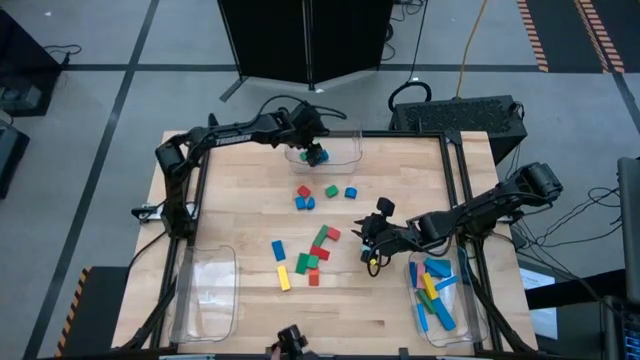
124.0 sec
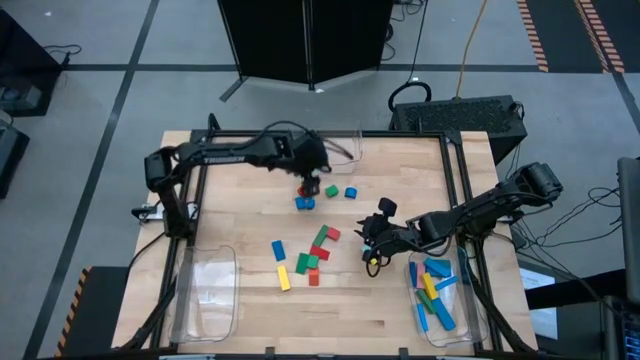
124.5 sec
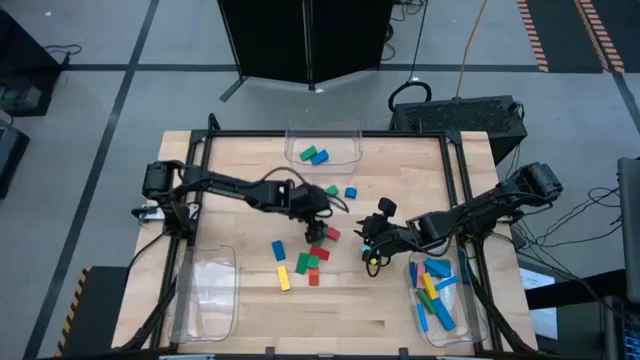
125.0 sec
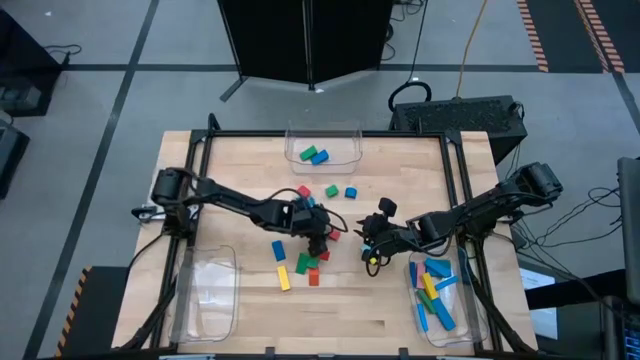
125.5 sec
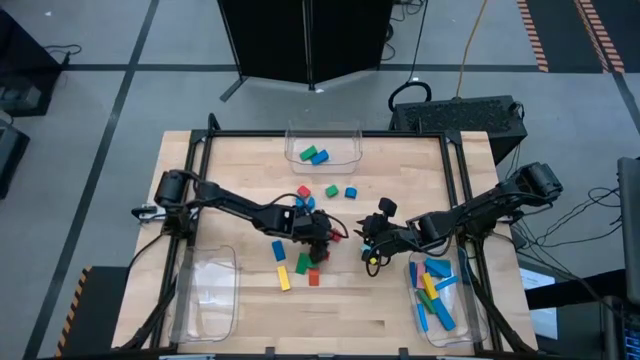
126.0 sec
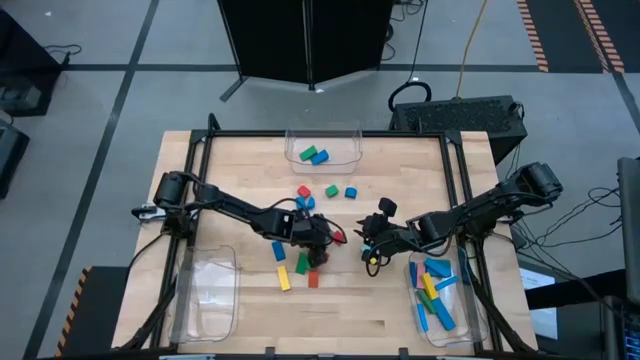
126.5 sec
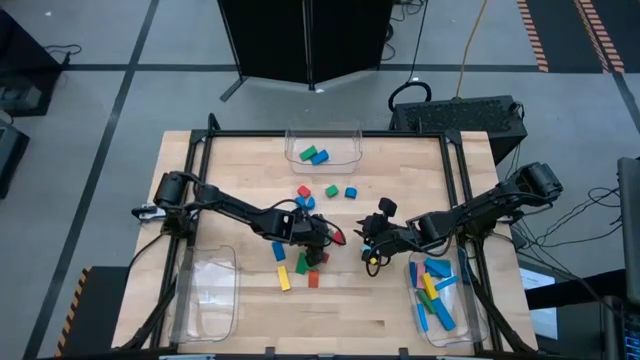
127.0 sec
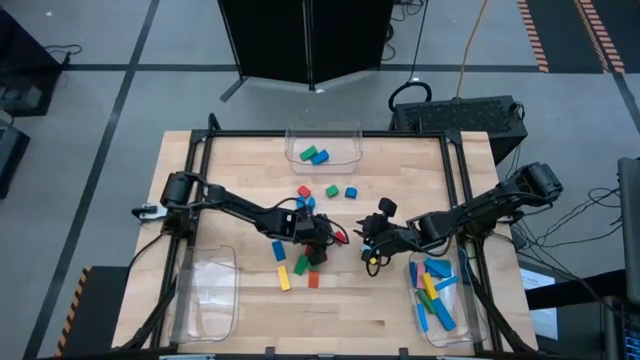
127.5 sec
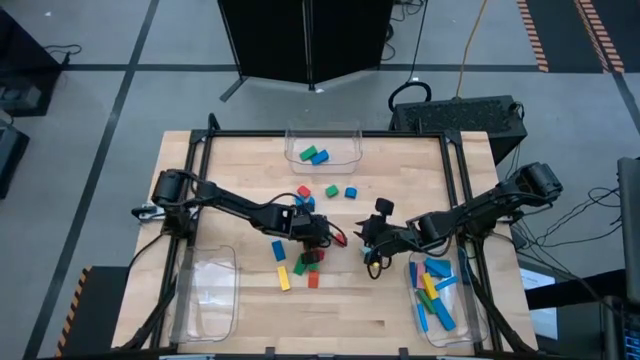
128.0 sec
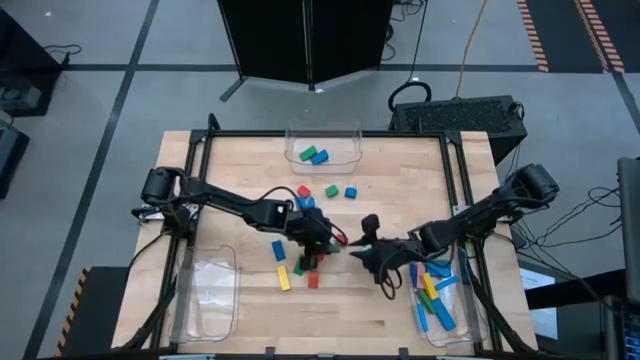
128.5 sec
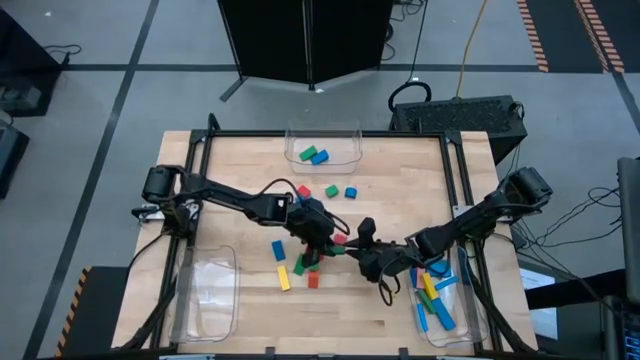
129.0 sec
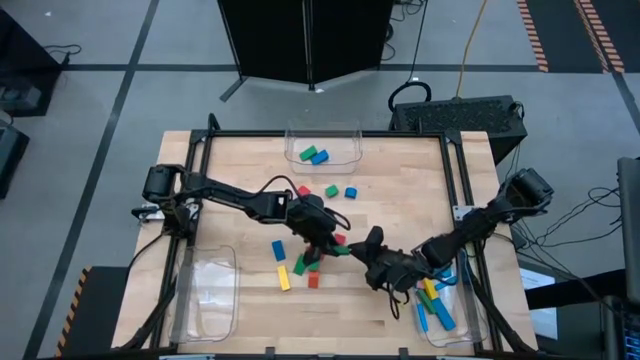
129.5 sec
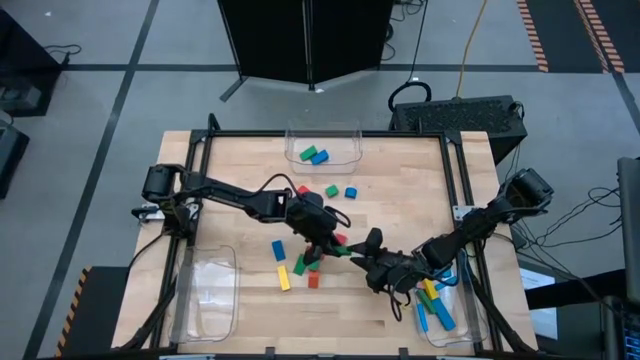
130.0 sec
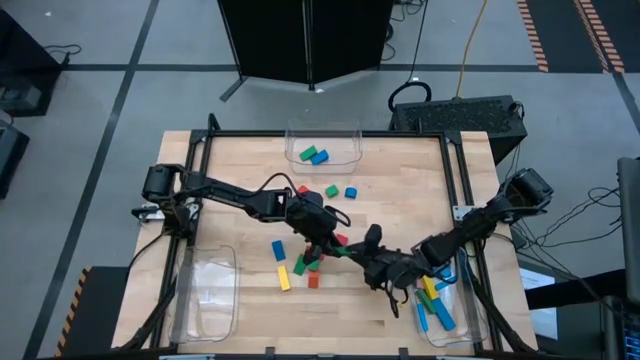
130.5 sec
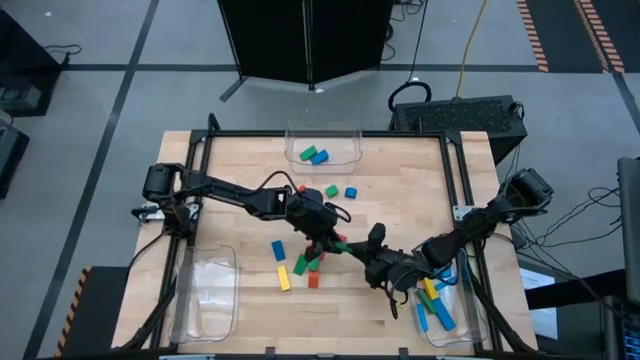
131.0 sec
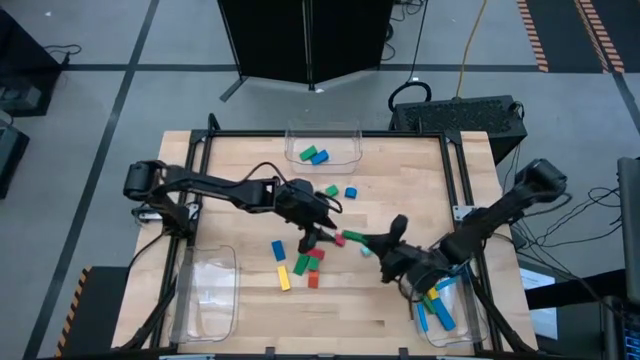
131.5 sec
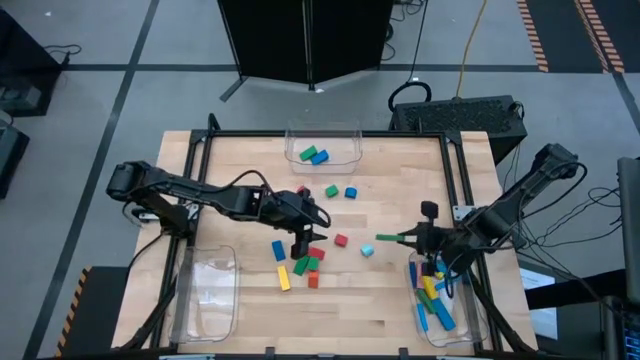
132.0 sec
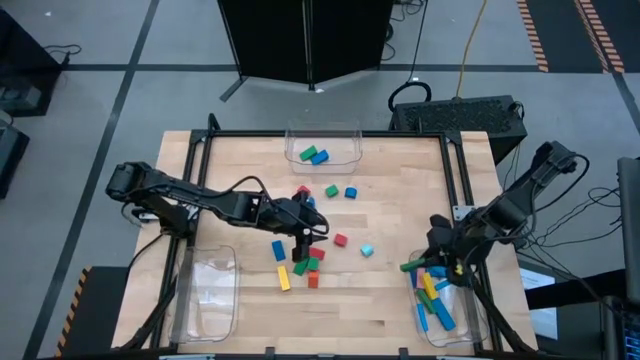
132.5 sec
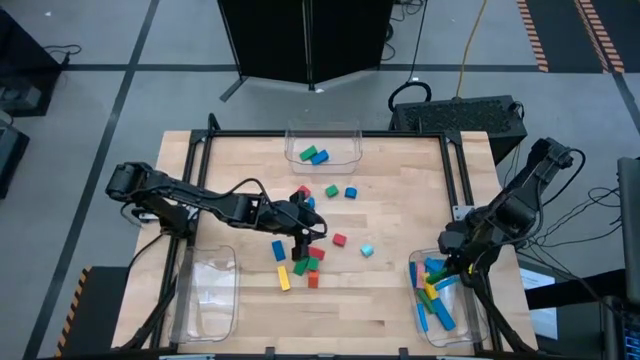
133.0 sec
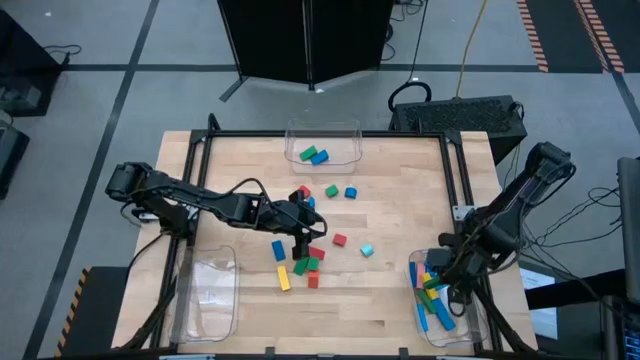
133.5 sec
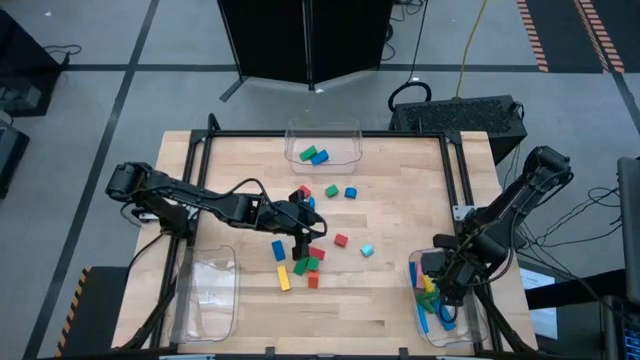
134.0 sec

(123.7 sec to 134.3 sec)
Task: Sort blocks by size
Put the green rectangle block into the bottom right transparent bin

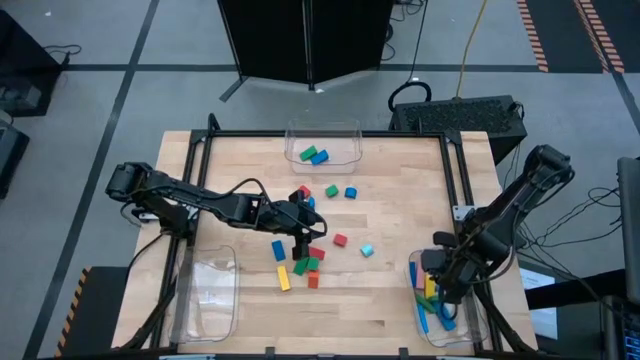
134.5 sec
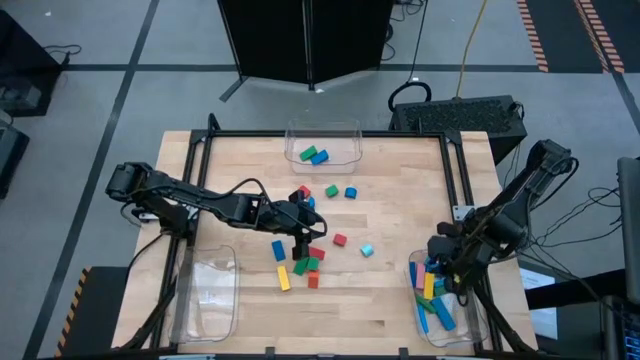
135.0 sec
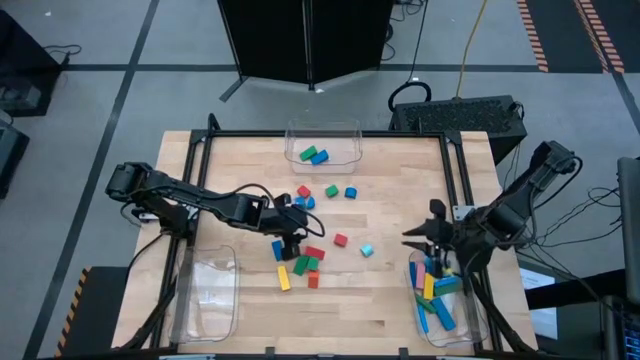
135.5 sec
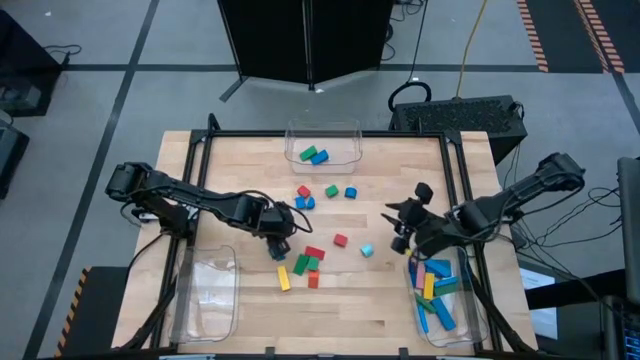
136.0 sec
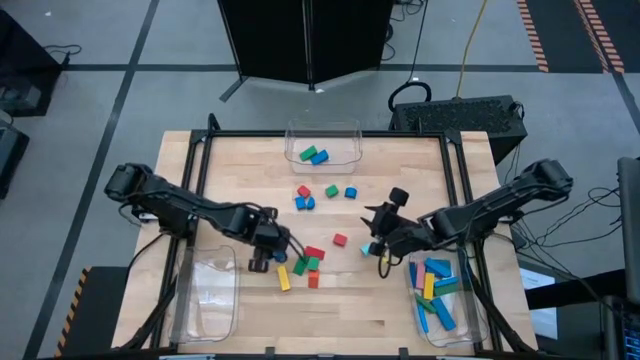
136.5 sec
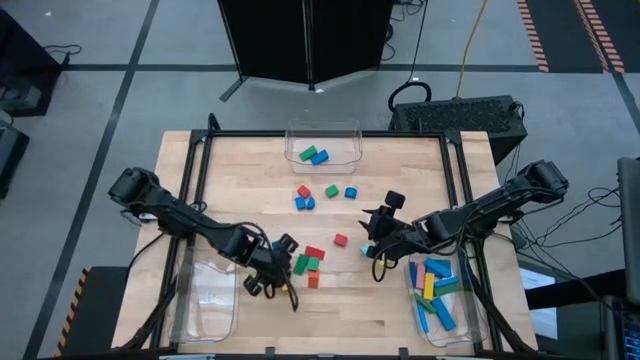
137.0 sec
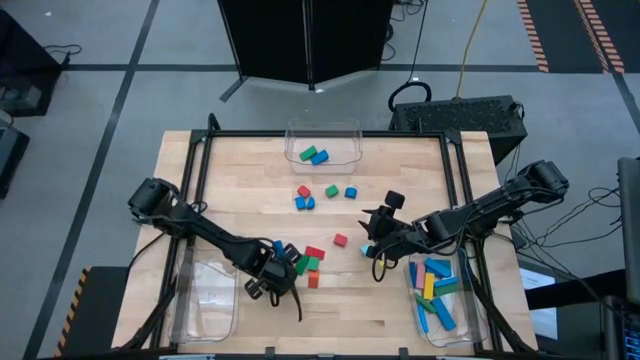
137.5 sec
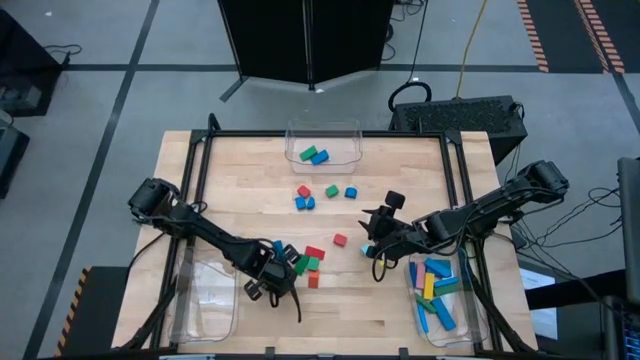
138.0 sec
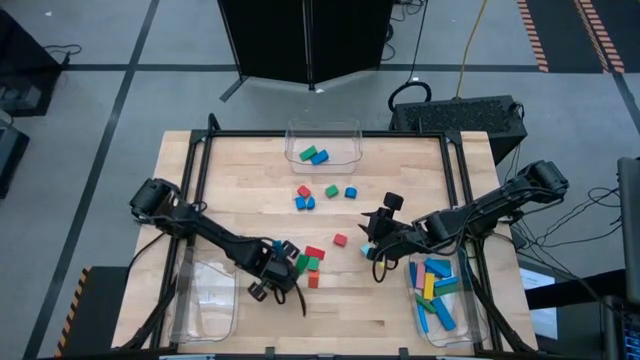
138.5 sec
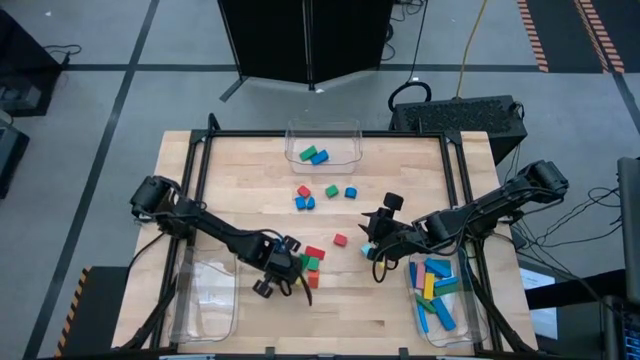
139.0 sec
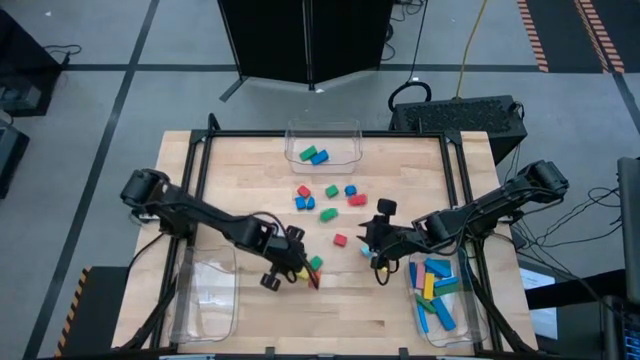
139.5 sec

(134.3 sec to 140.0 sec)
Put the yellow rectangle block into the bottom right transparent bin

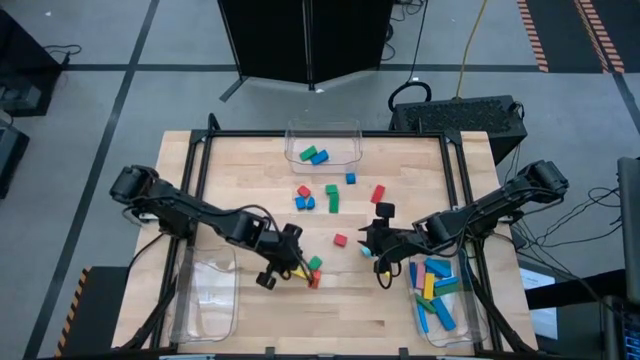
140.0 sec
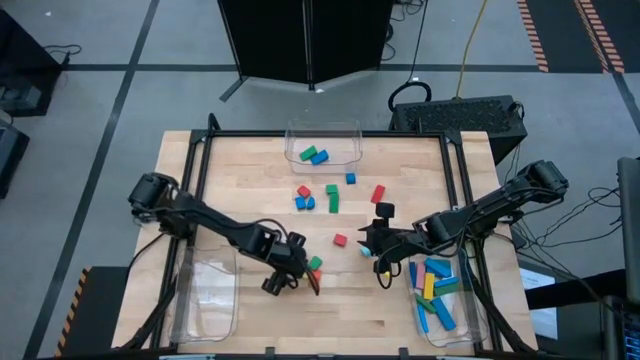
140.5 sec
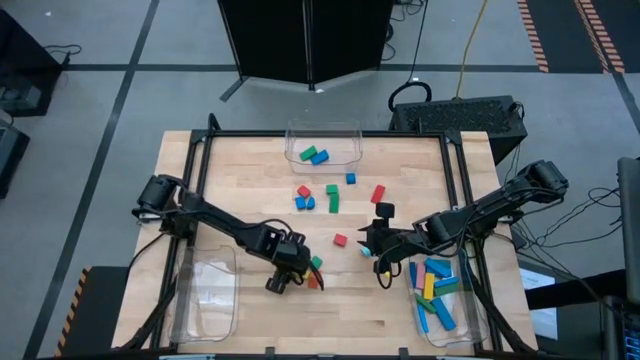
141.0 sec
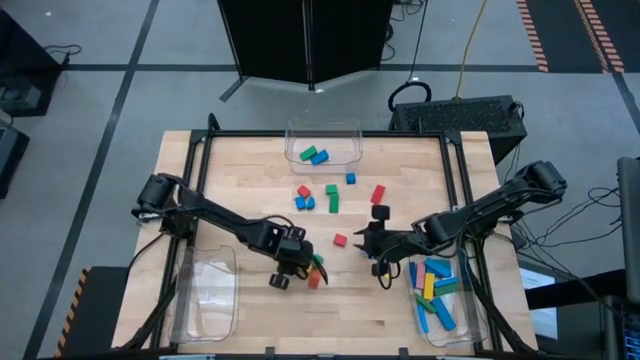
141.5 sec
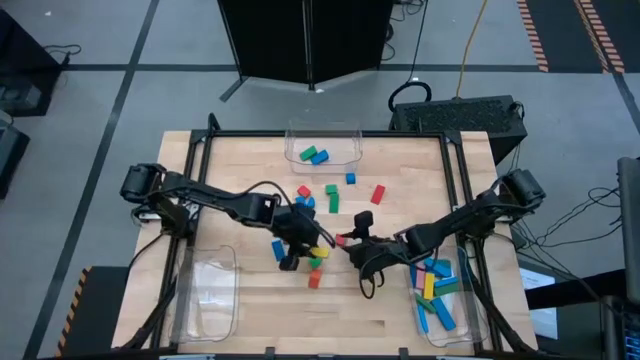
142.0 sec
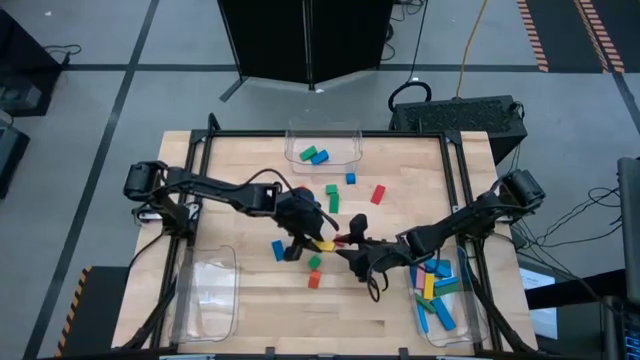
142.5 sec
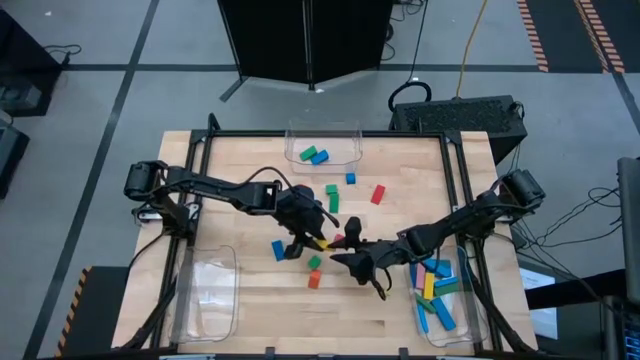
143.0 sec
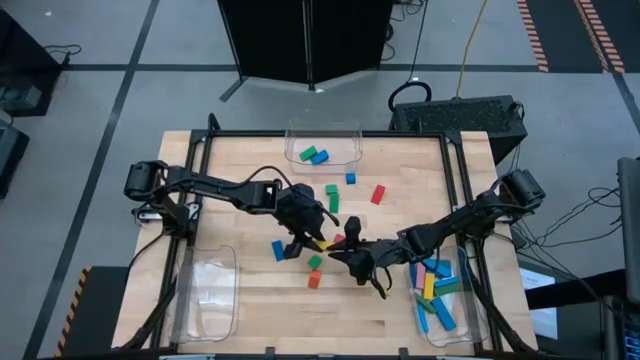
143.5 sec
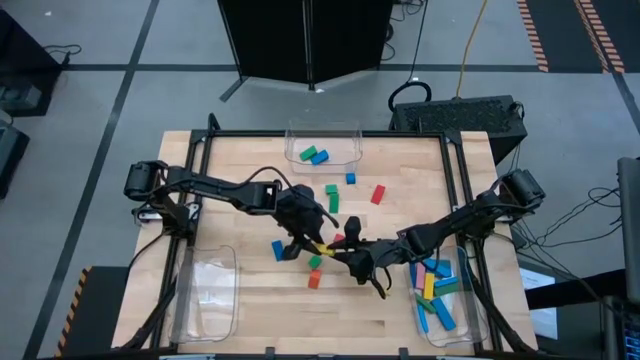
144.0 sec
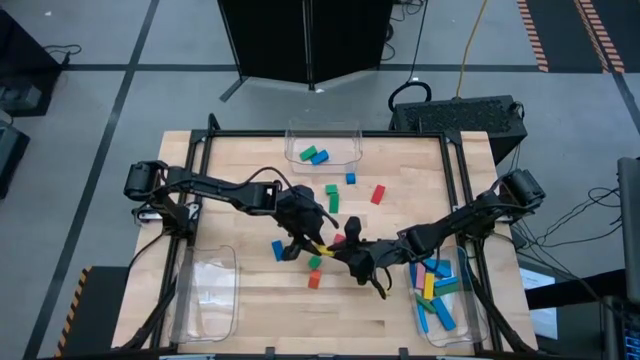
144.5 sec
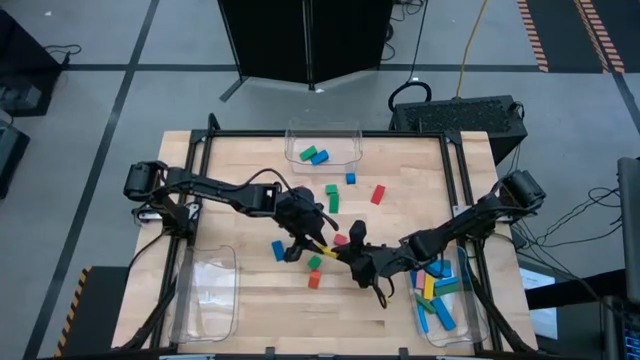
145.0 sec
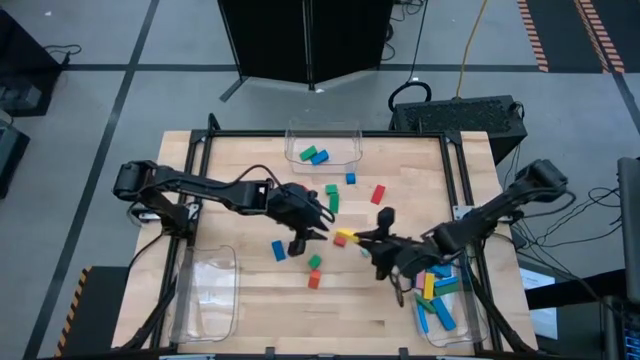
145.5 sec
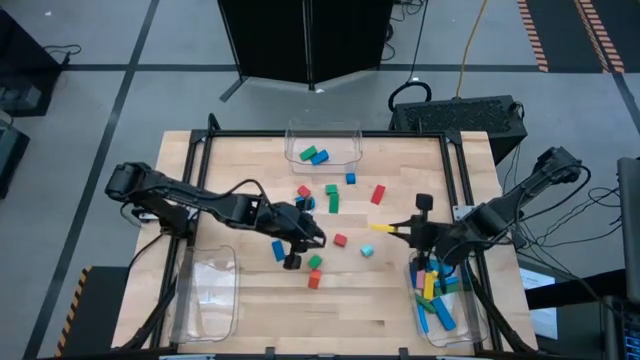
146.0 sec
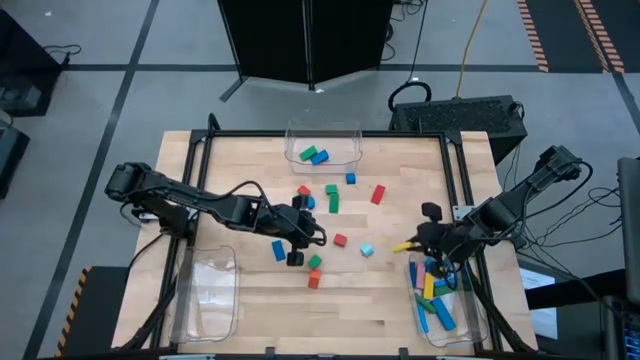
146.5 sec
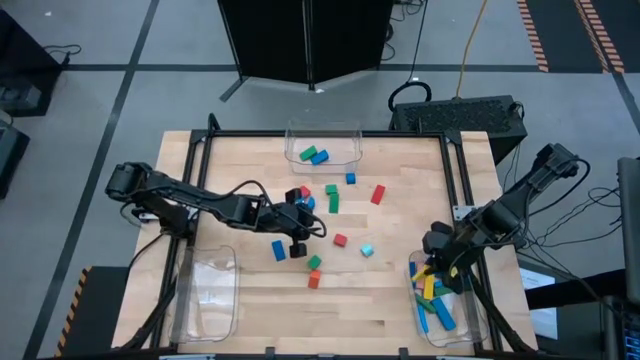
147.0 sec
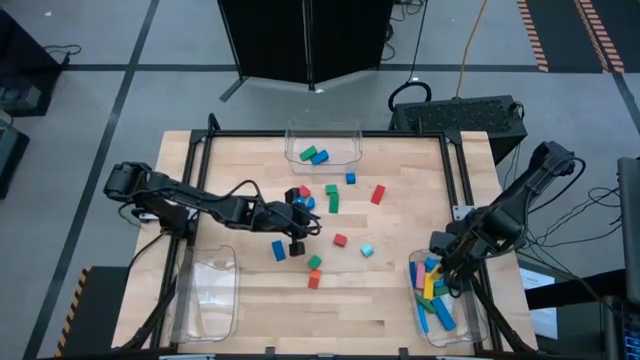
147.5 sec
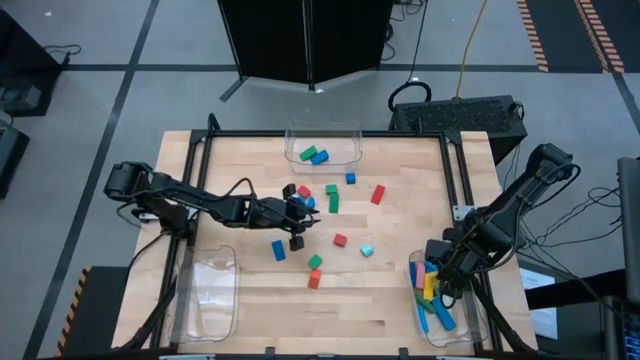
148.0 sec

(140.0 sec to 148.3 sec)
Put the yellow rectangle block into the bottom right transparent bin
